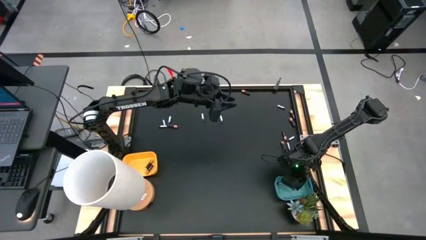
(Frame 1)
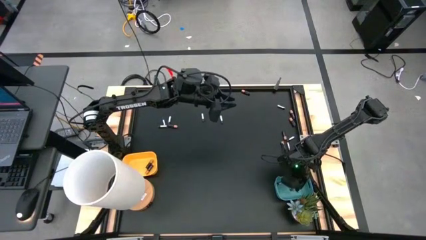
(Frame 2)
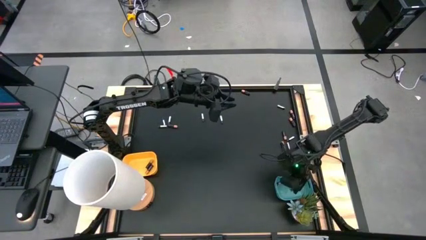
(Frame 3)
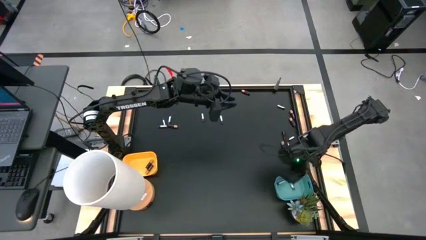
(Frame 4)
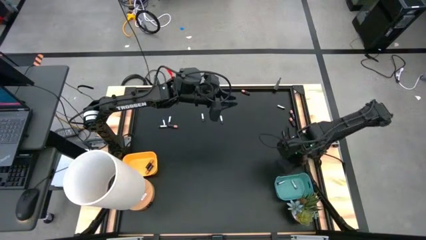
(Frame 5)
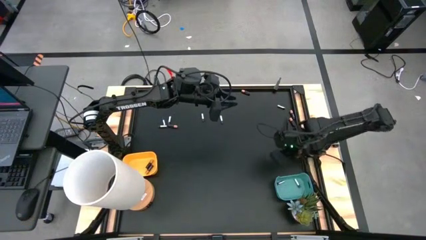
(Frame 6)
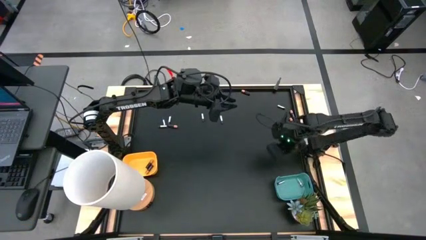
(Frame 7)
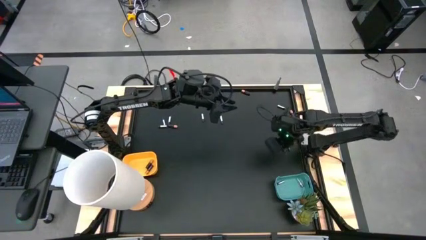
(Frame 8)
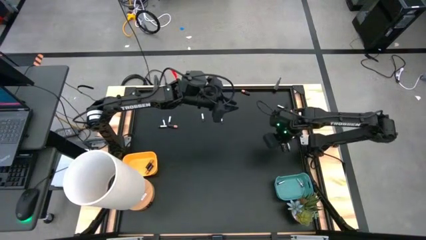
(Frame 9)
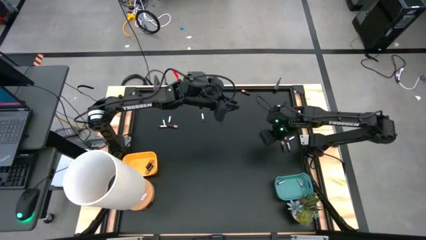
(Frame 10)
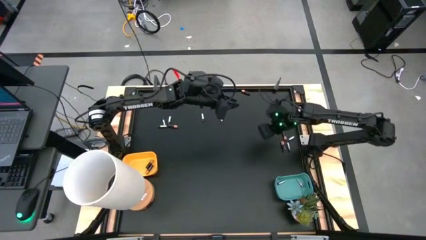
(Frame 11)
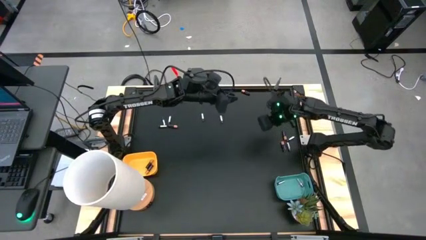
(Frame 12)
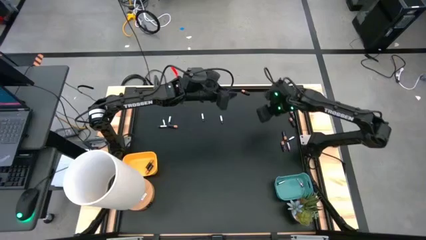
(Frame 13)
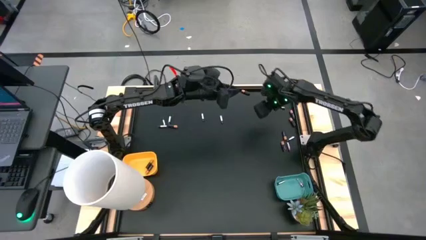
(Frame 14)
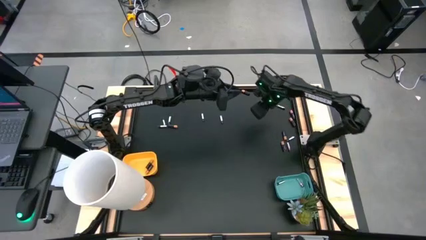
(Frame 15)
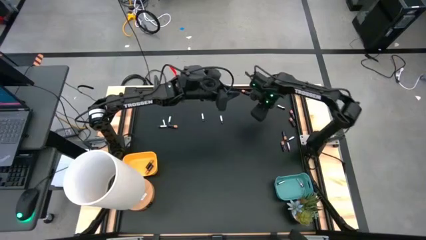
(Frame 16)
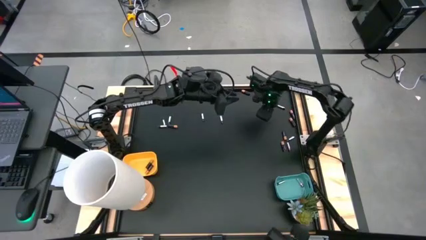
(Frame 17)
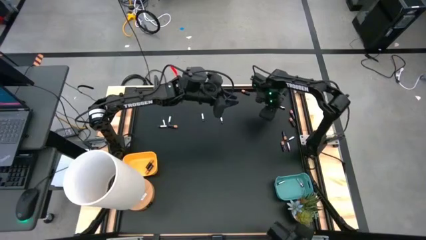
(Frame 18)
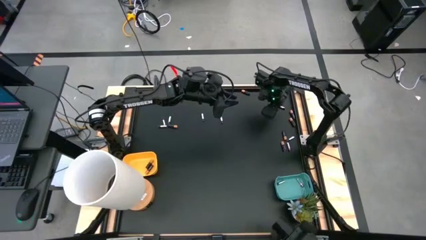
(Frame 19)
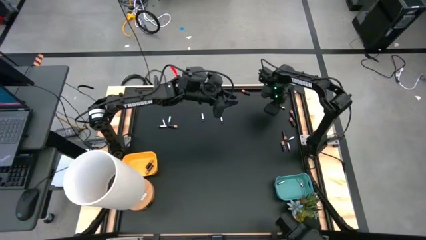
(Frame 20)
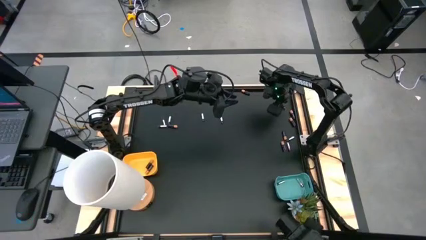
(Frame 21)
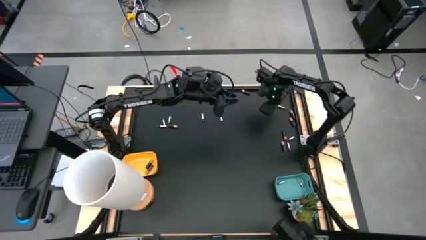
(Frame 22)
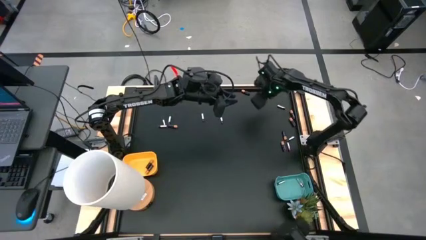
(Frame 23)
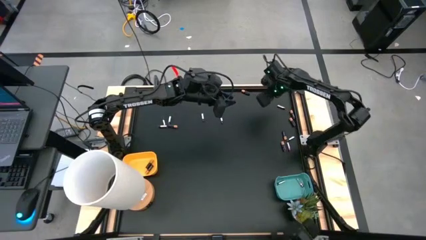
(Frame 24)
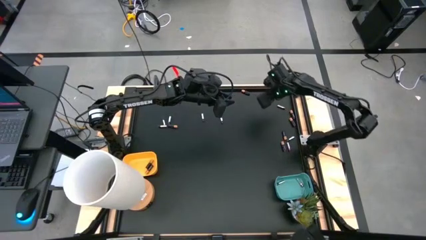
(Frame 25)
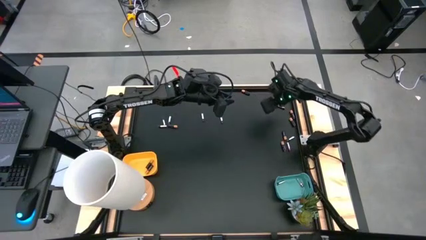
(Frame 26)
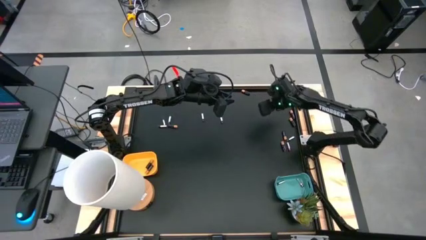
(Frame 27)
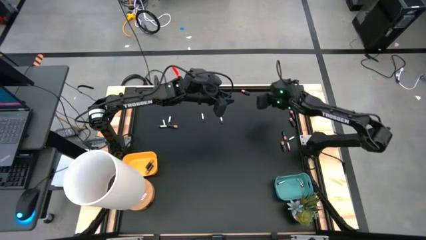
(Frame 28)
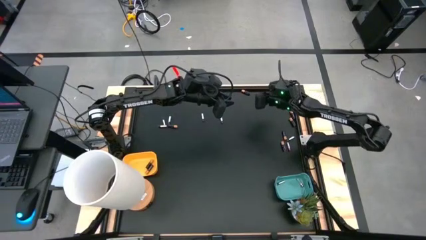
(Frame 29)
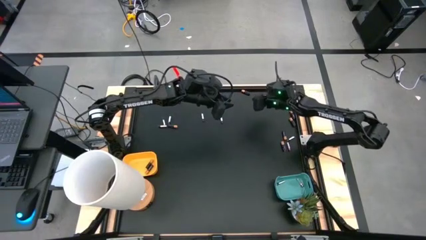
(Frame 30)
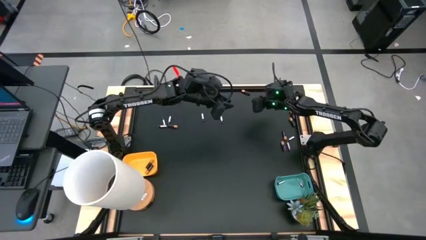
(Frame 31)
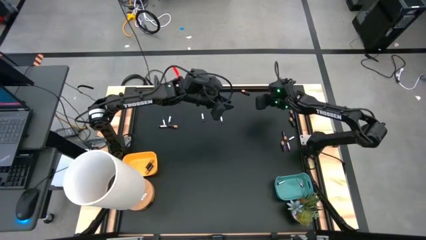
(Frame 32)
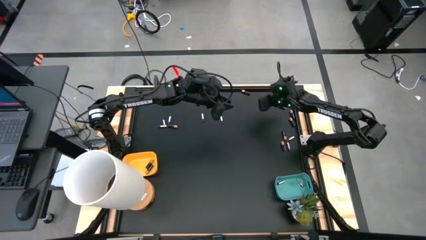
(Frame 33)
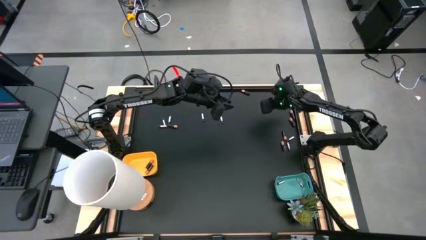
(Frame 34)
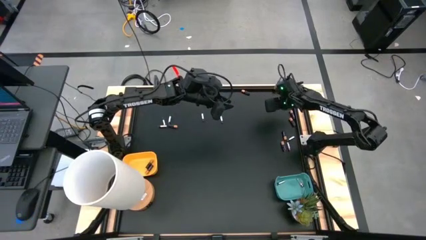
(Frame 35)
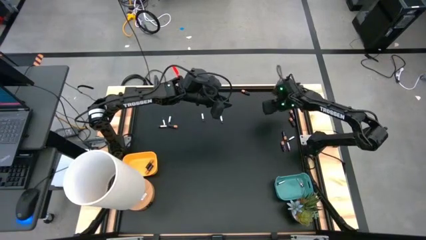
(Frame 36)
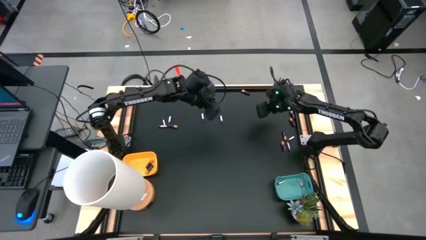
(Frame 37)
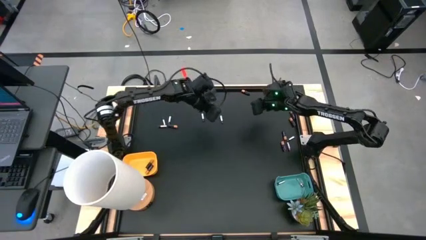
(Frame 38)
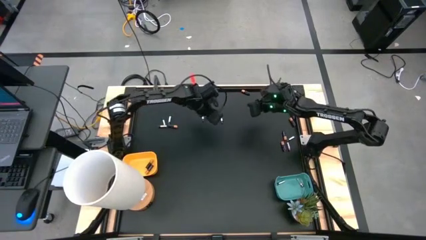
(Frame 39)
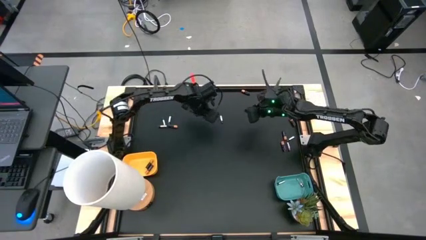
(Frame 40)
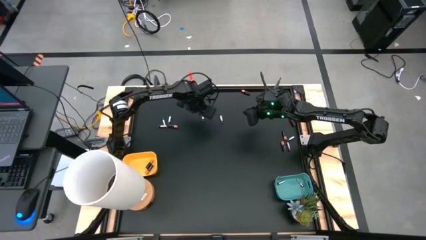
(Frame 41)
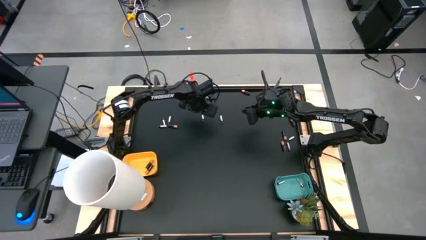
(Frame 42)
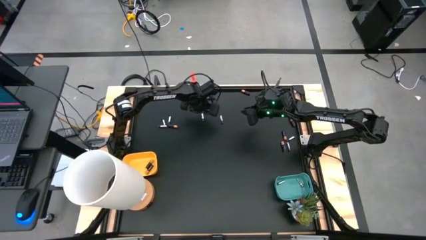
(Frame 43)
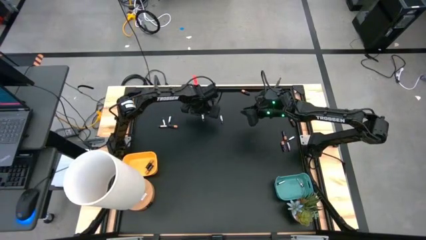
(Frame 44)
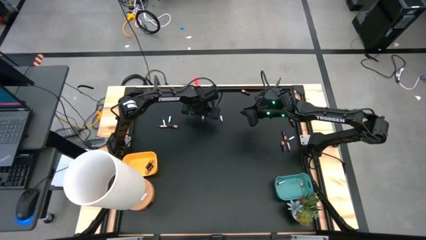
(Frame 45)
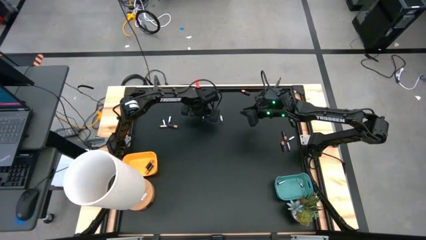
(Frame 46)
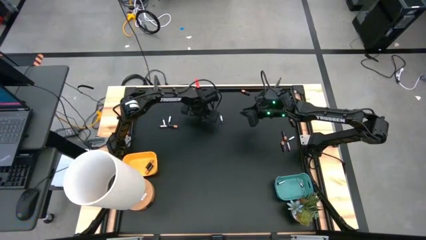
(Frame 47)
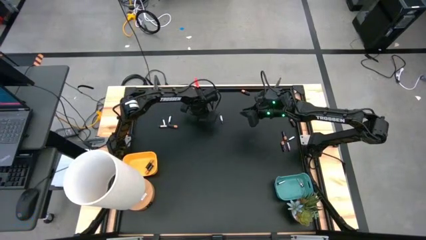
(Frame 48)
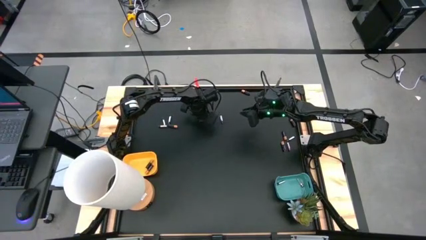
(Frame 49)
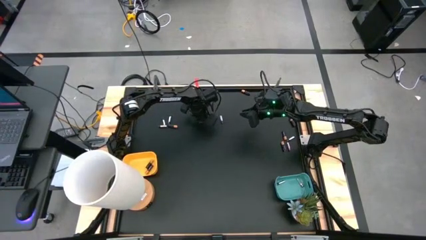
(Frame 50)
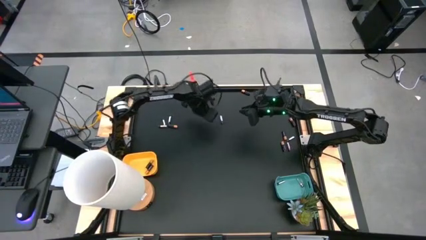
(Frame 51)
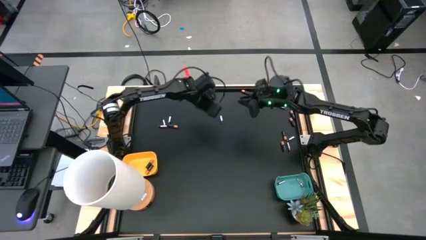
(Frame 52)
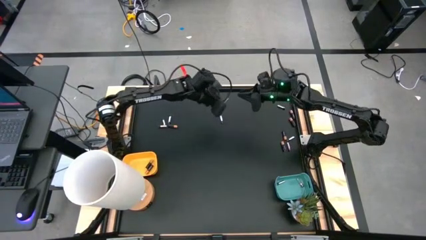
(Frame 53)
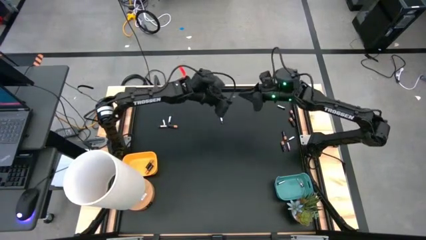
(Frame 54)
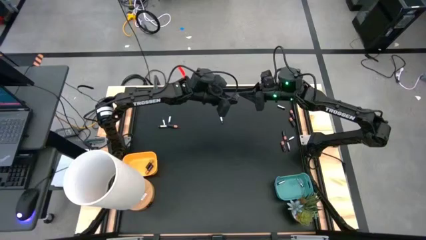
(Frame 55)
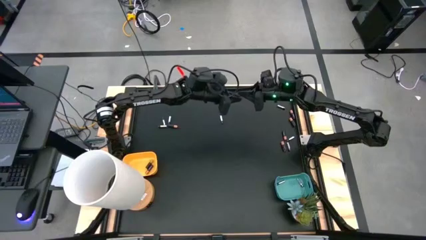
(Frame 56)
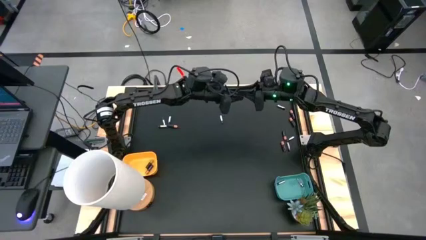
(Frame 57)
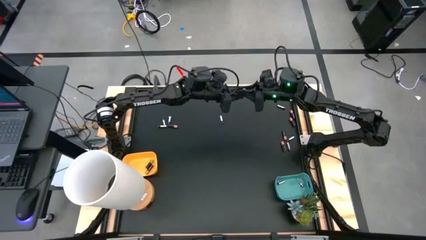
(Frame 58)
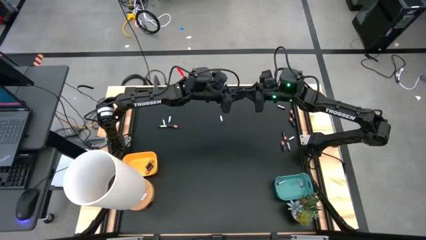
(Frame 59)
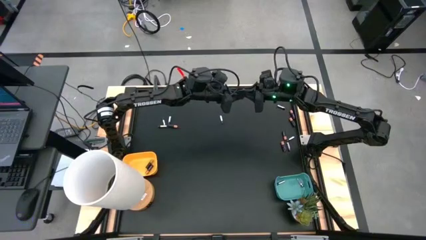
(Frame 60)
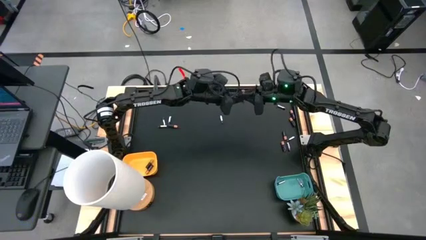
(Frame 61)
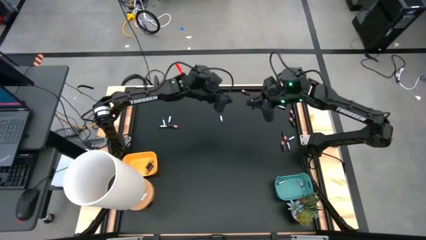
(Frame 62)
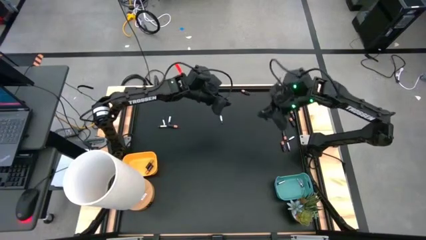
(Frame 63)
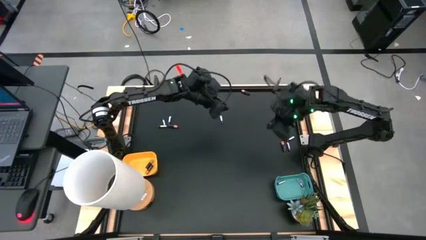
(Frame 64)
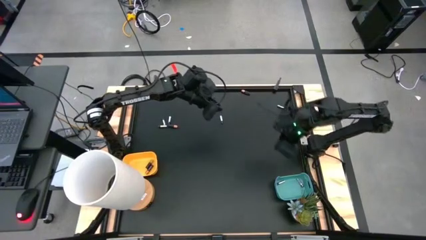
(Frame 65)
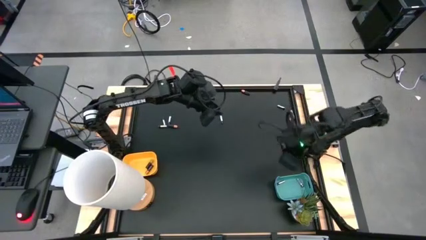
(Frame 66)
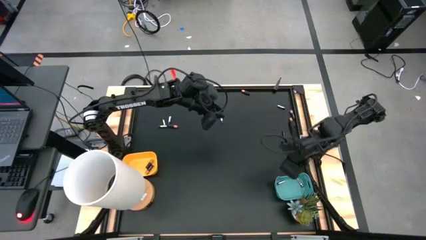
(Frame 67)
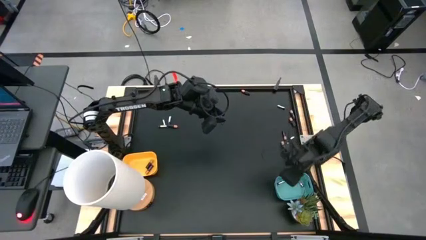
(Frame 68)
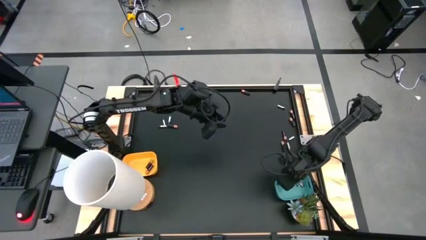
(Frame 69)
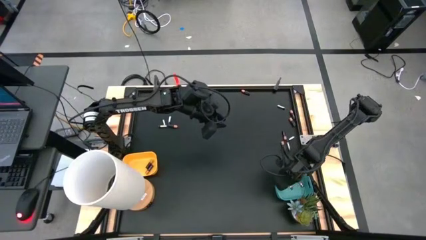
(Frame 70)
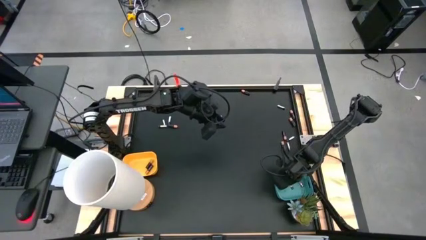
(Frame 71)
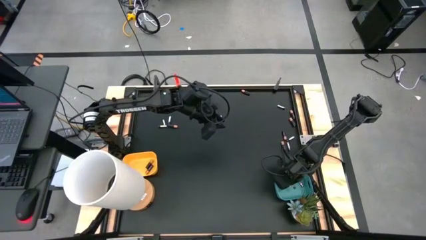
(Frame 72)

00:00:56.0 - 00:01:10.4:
Task: Sort batteries
Put the silver battery into the green bin

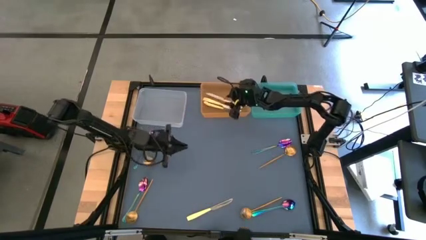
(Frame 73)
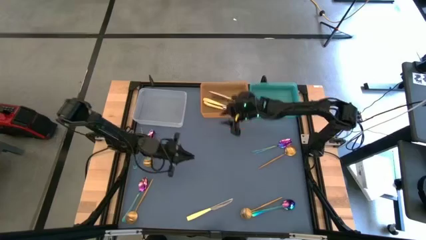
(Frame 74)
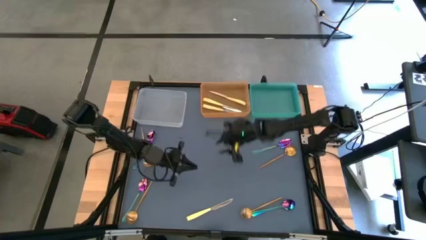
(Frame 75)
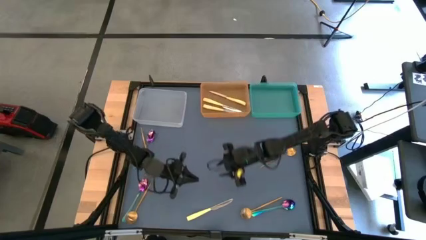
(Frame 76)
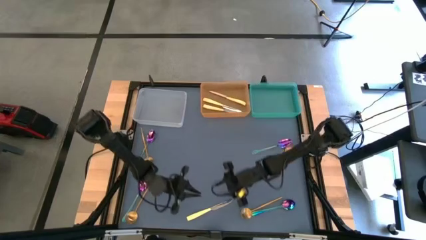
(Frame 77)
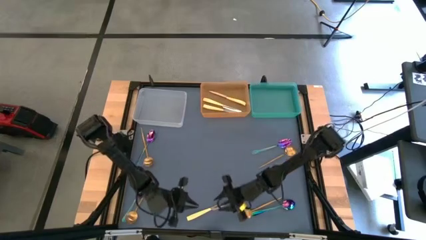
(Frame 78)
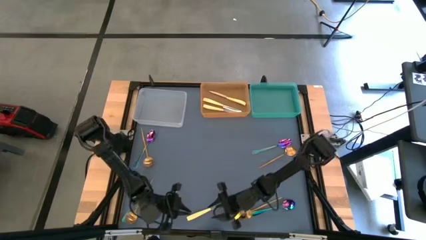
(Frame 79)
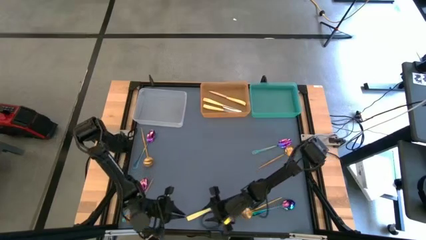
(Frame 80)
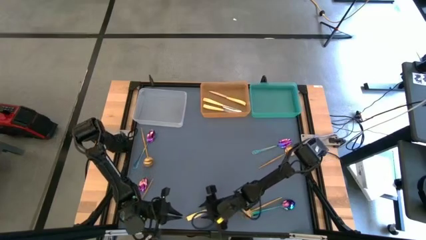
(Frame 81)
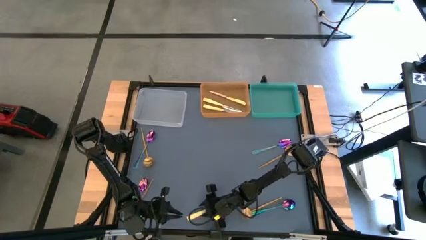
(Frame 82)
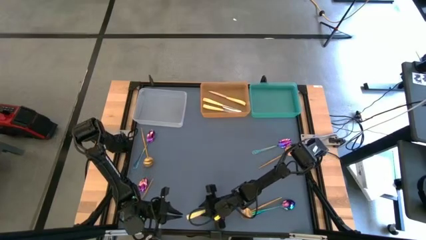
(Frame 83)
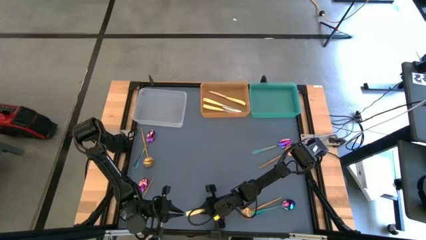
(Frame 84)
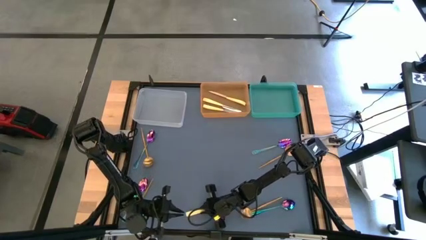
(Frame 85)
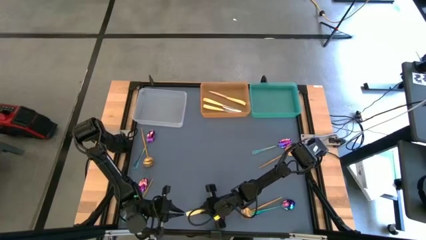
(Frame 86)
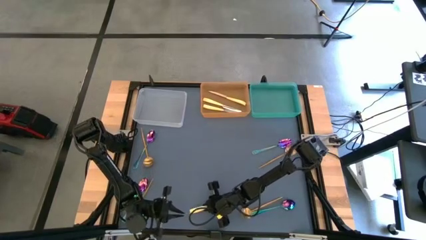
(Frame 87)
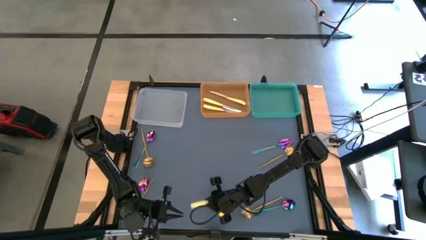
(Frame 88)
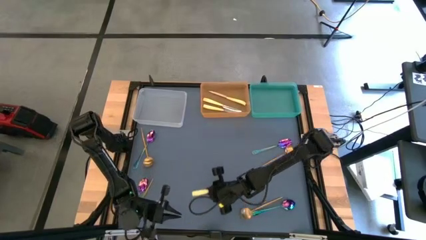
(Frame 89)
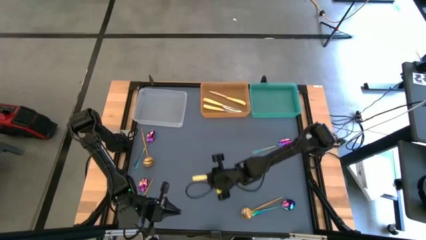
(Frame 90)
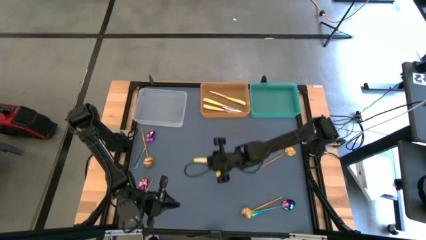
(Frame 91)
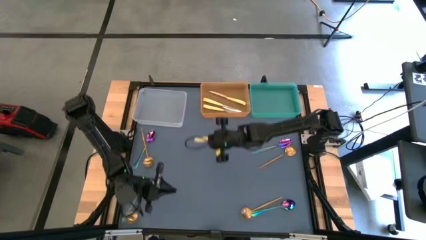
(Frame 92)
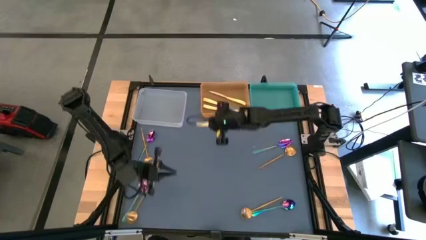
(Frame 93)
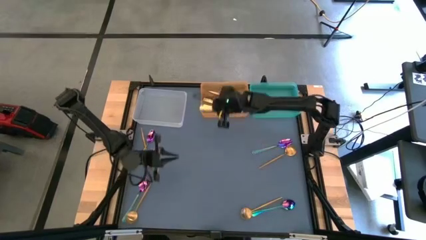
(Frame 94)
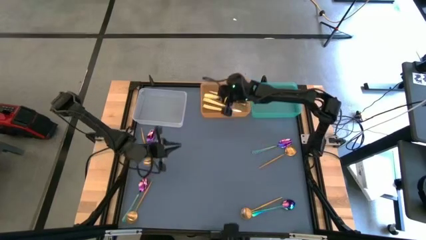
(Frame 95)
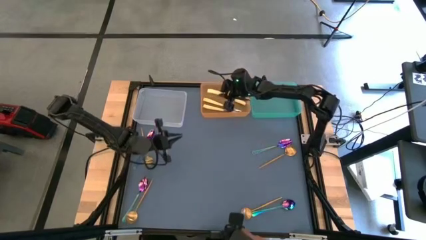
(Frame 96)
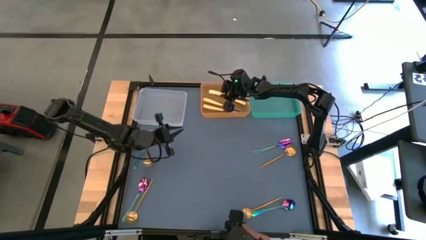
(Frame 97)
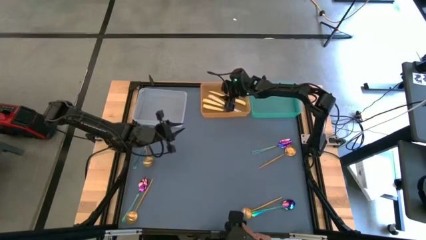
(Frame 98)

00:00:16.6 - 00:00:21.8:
Task: Sort silverware by color (type)
Put the yellow table knife into the orange bin
